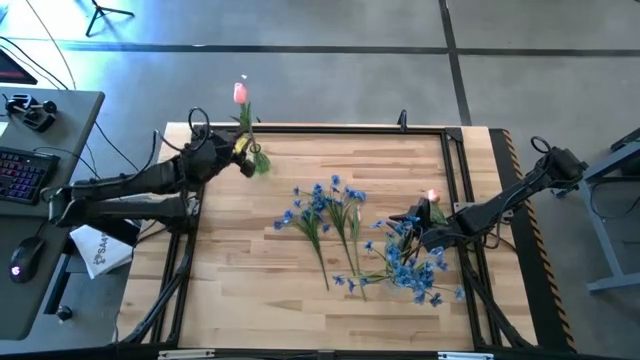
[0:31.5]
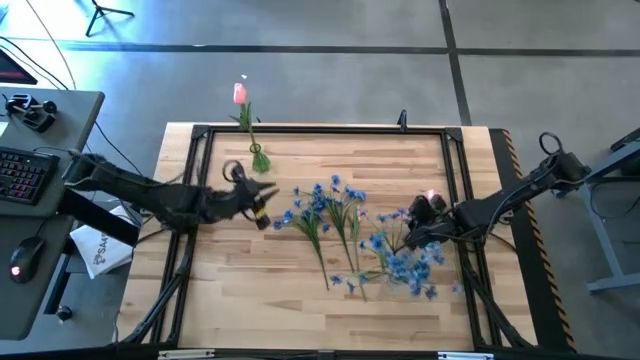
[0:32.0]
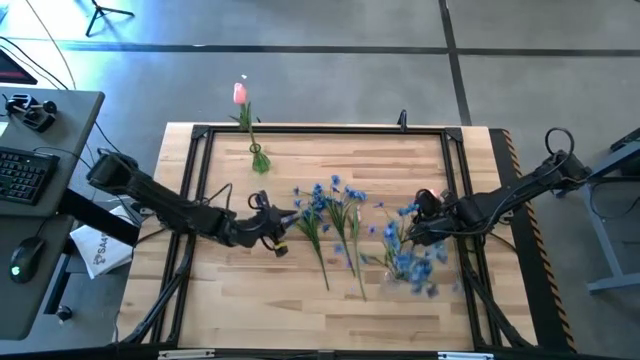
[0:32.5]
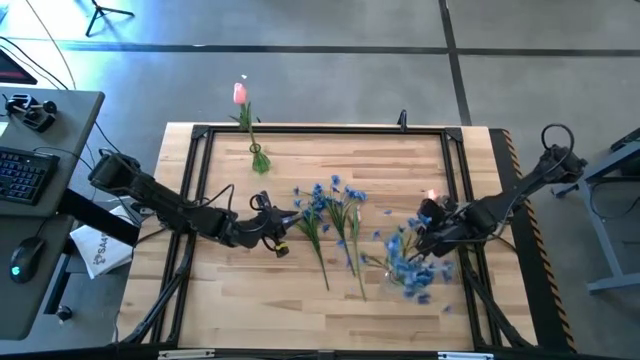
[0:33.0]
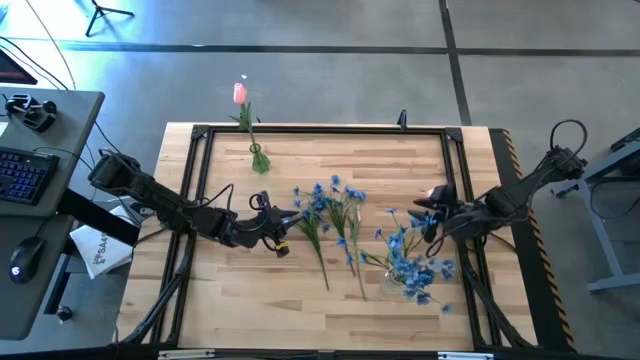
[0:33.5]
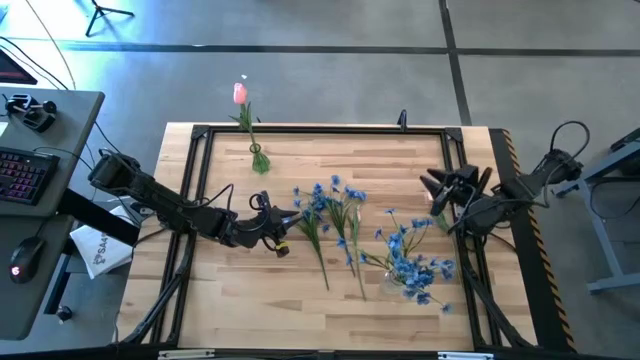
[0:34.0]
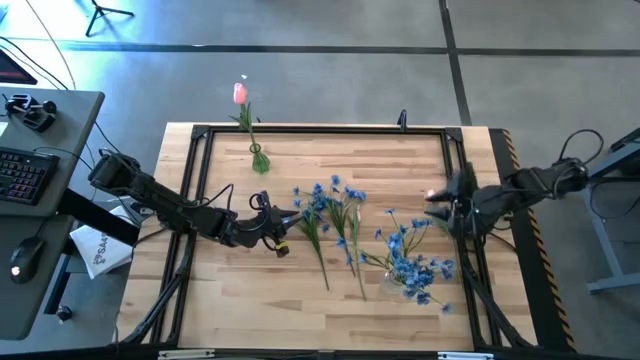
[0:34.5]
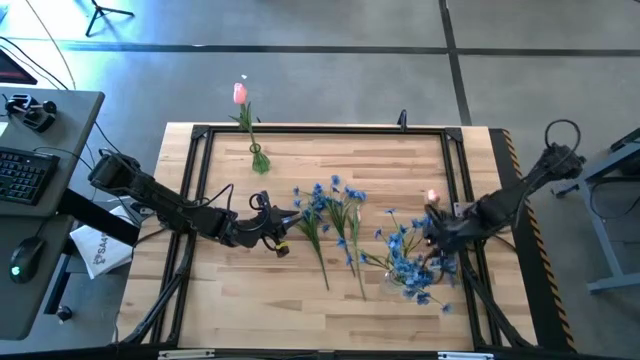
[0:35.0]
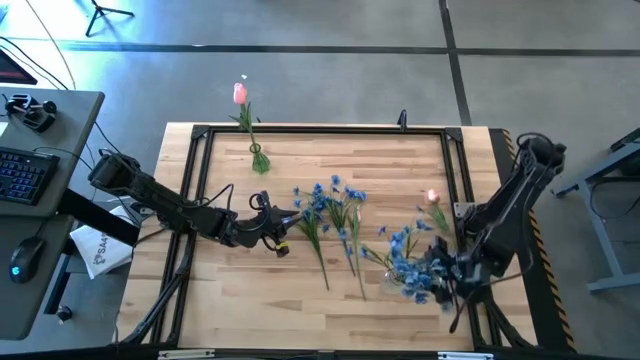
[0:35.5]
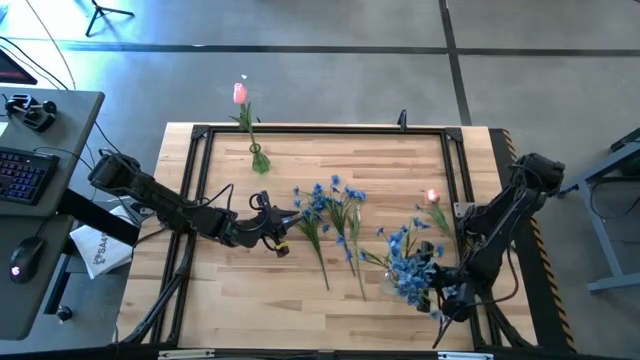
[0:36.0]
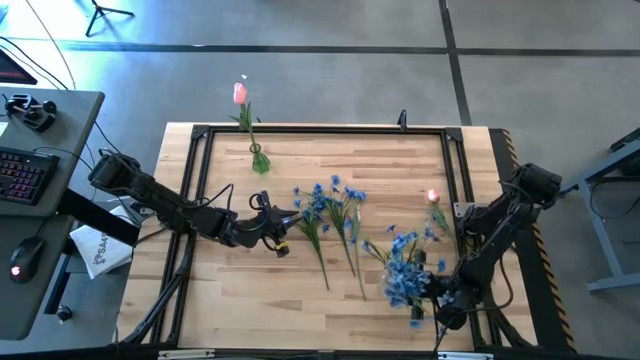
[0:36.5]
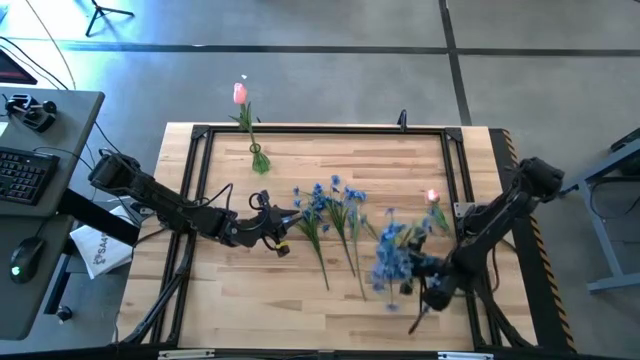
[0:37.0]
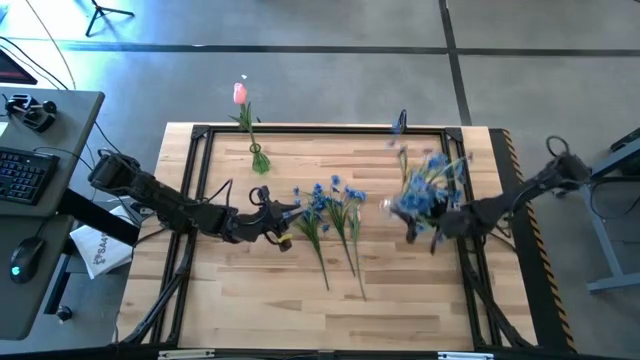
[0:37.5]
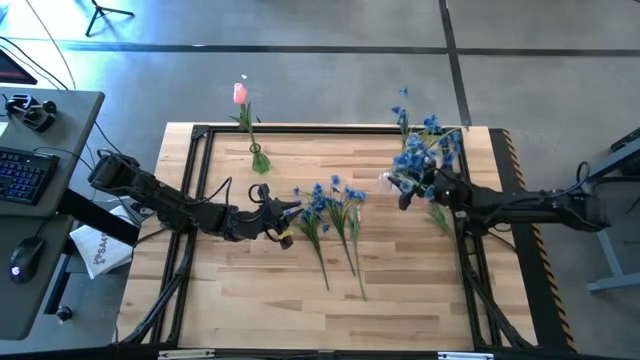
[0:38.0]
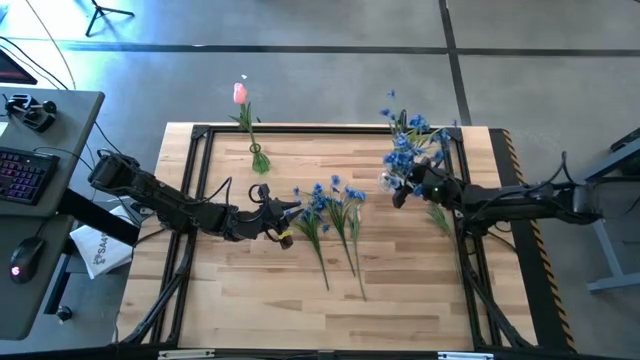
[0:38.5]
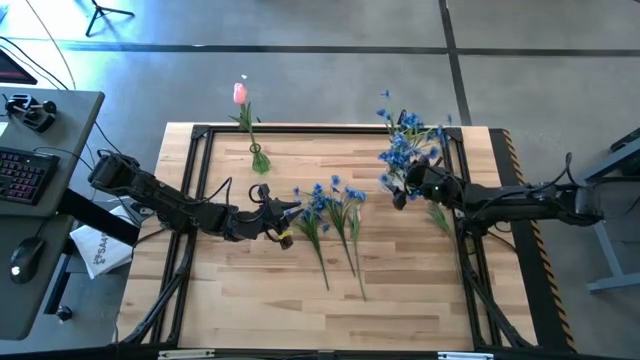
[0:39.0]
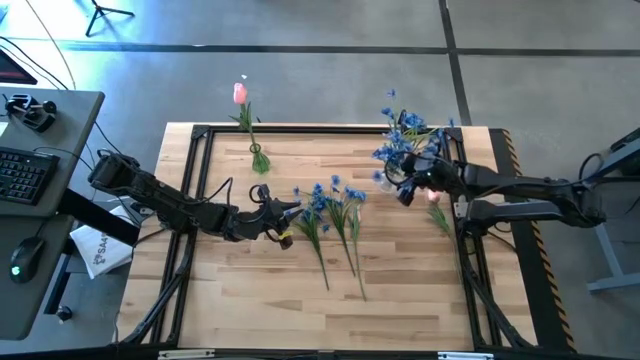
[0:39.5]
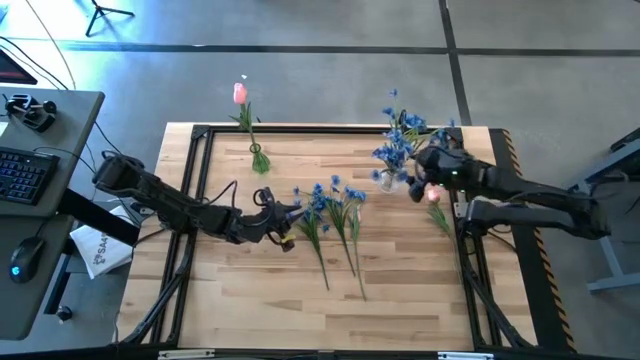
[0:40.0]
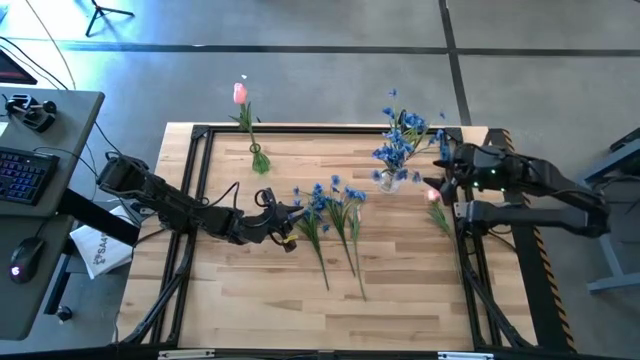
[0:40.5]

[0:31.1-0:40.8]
Task: Sort flowers into vase by color
Move the transparent vase to the top of the table

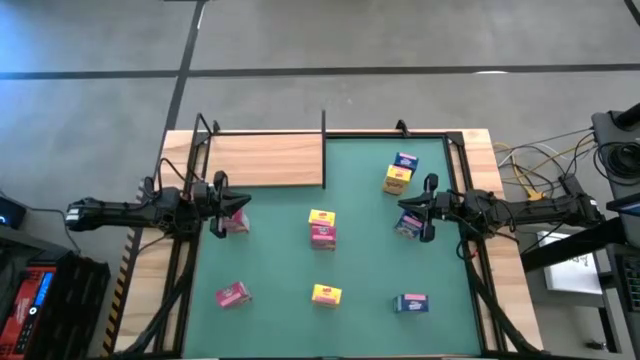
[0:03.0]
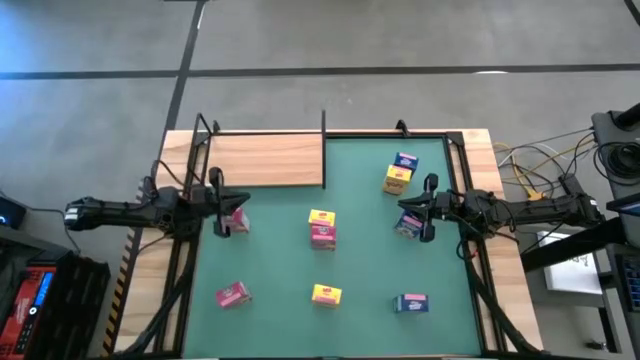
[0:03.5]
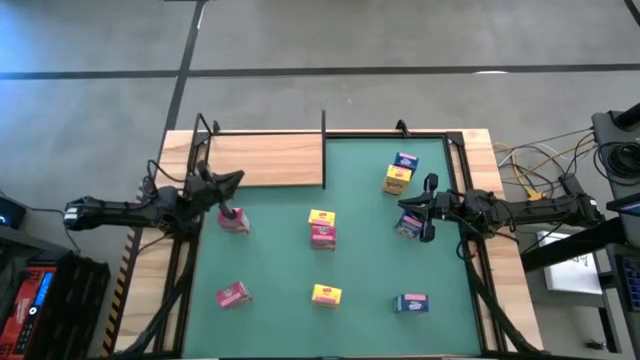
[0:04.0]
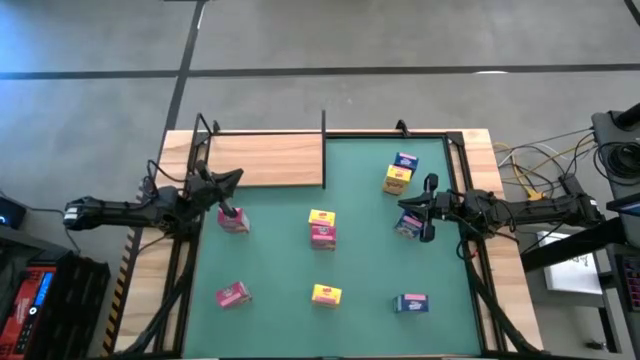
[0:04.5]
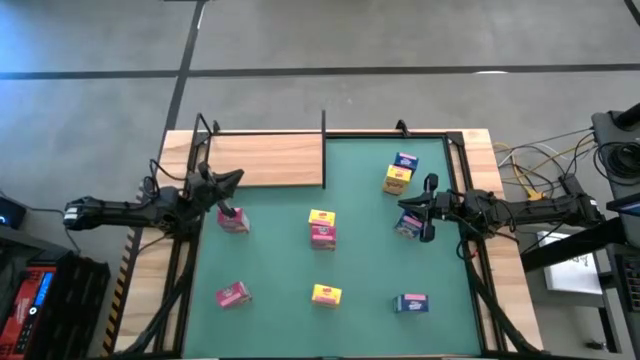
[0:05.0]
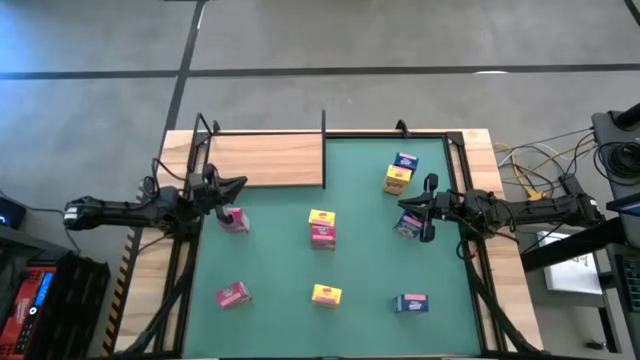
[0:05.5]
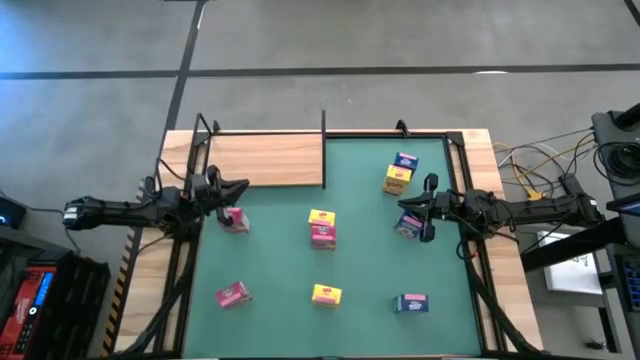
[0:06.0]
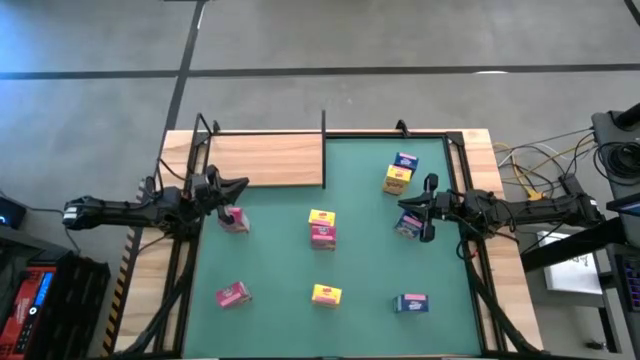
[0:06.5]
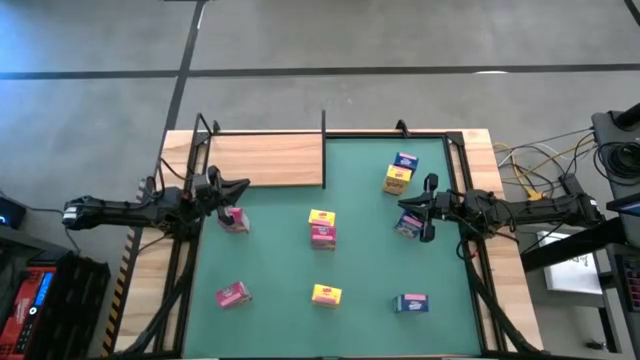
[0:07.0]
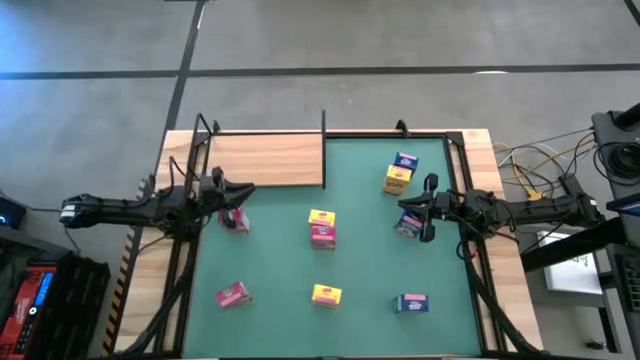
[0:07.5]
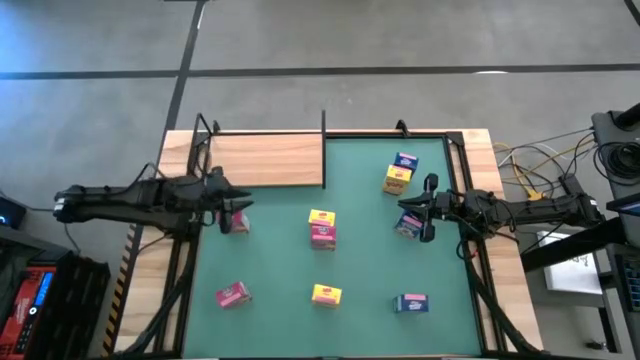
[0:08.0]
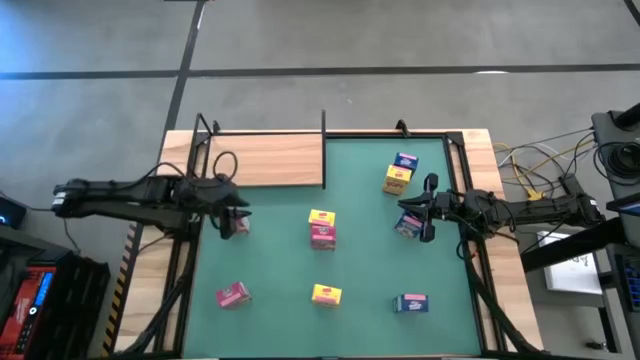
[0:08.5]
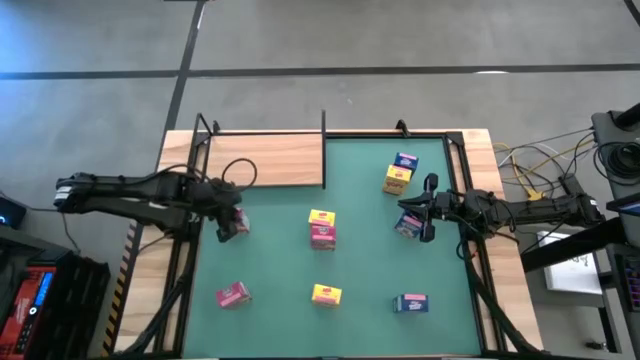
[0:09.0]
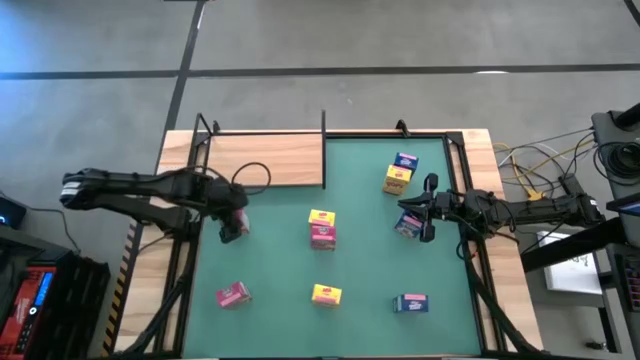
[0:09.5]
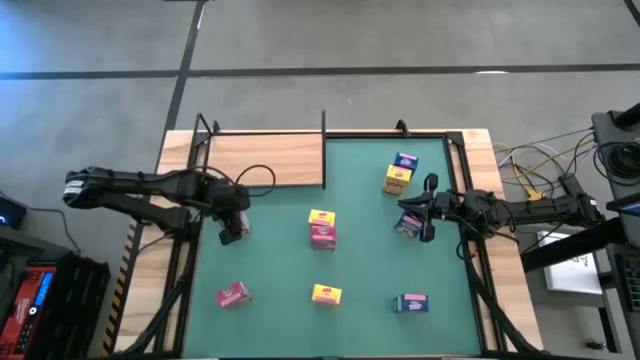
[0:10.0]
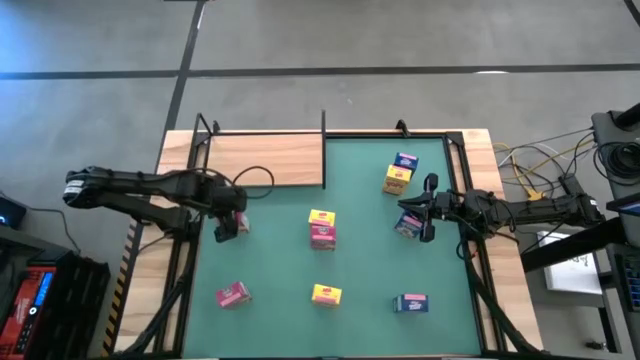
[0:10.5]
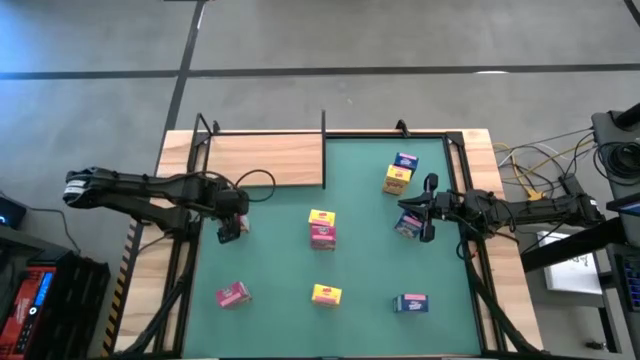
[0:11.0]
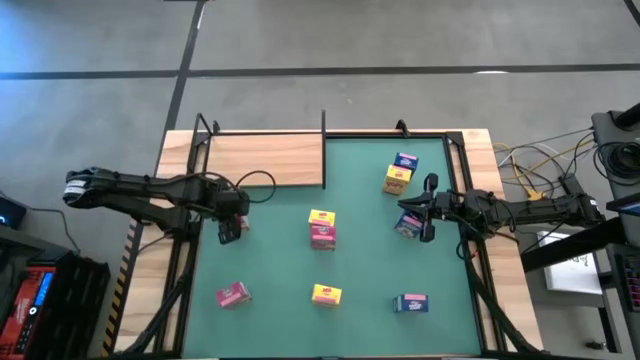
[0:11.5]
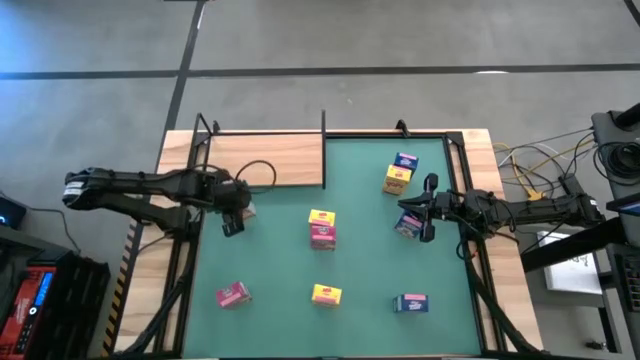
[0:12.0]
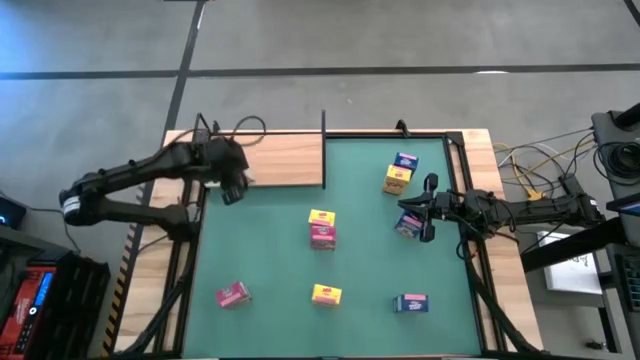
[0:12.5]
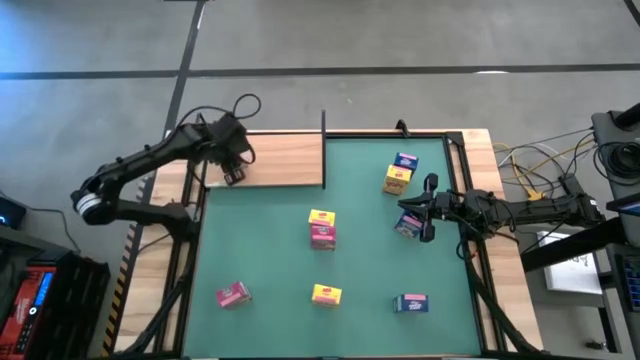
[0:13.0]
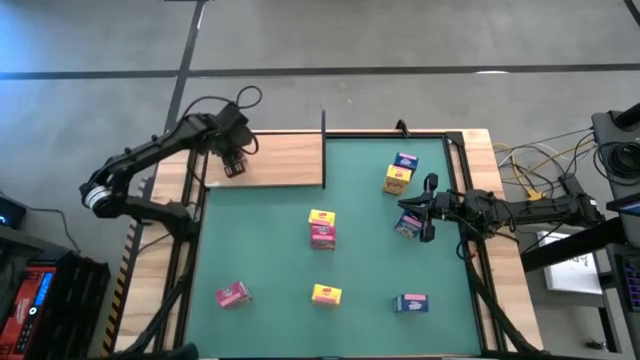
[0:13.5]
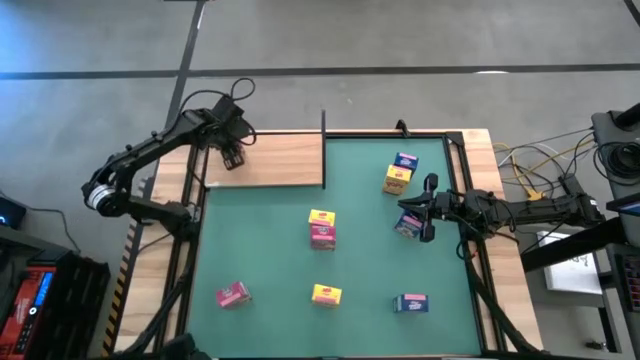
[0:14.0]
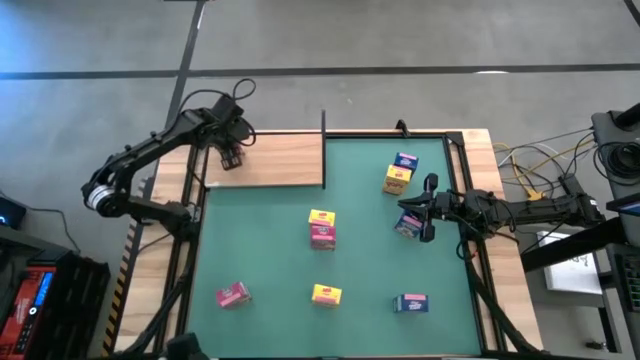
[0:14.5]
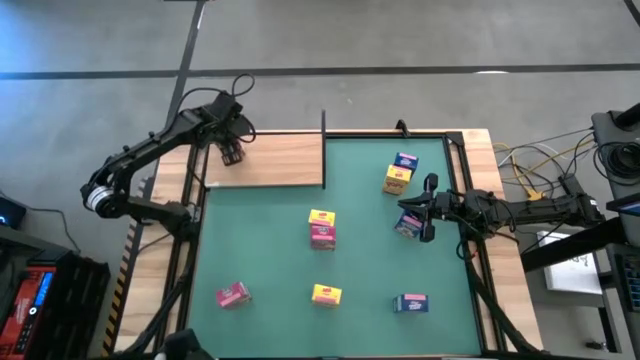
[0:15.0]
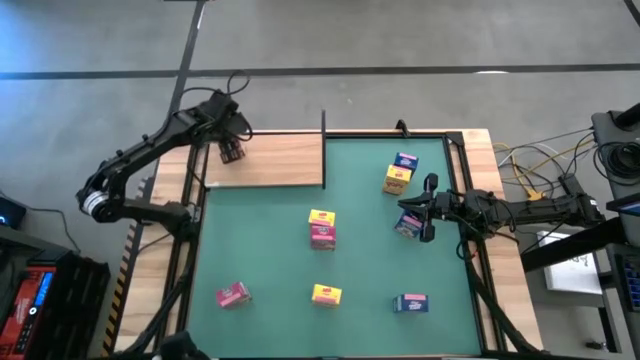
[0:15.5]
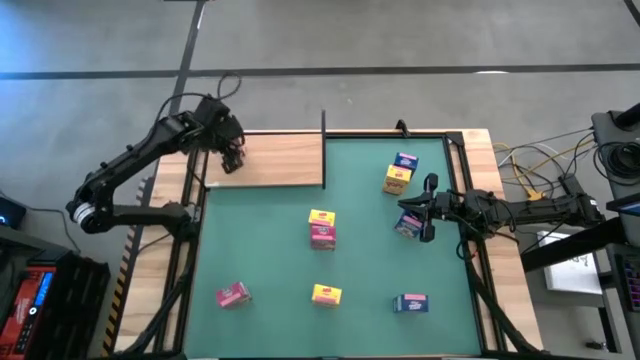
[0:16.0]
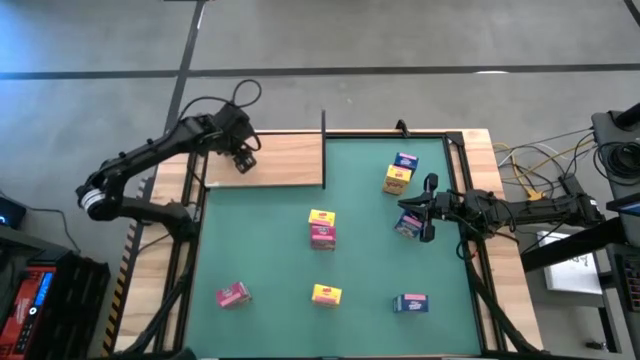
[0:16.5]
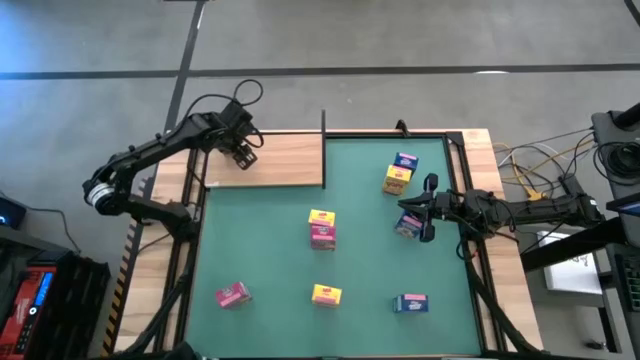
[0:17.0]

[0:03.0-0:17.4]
Task: Stack cereal on shelf
Put the top pink cereal box on the shelf
